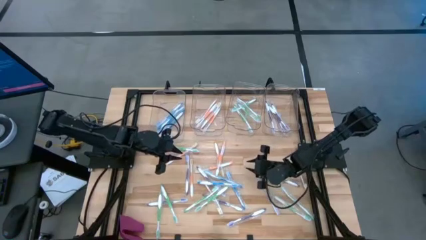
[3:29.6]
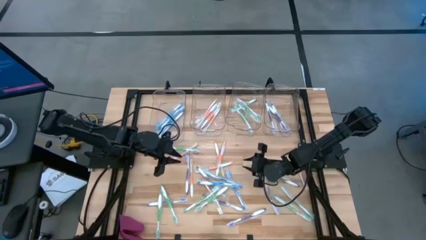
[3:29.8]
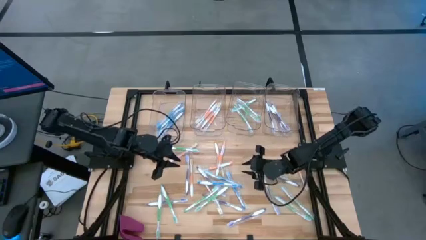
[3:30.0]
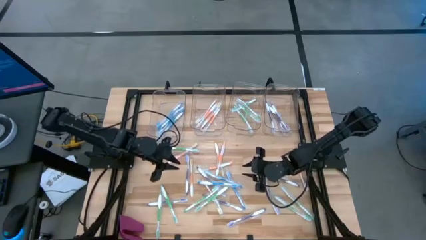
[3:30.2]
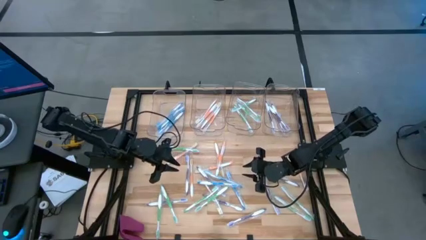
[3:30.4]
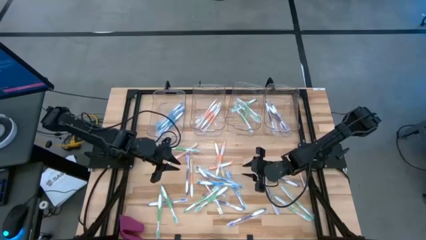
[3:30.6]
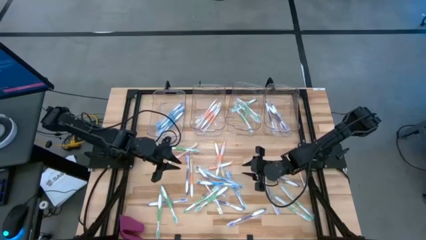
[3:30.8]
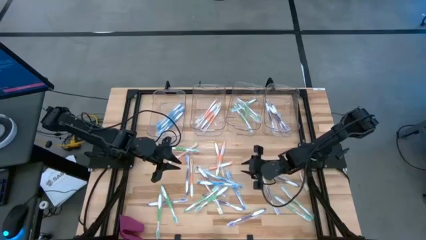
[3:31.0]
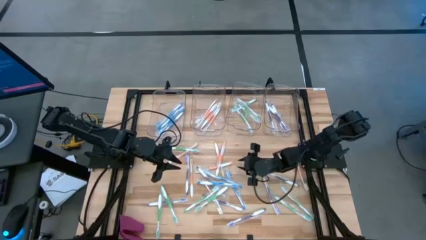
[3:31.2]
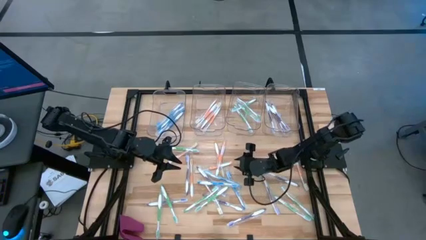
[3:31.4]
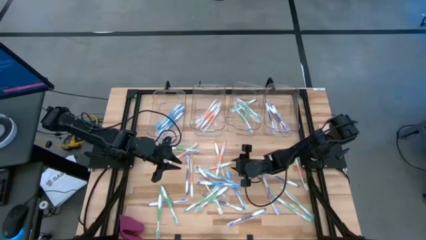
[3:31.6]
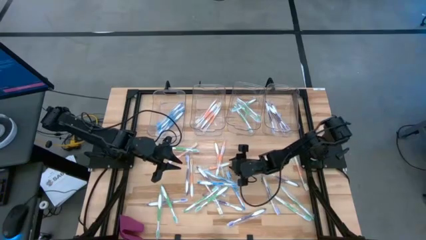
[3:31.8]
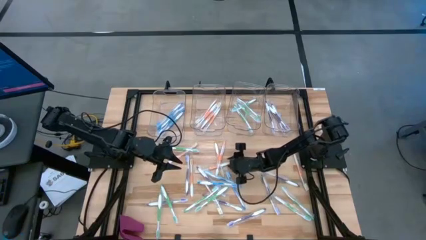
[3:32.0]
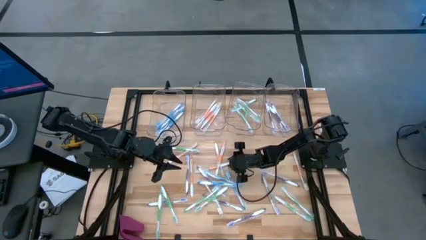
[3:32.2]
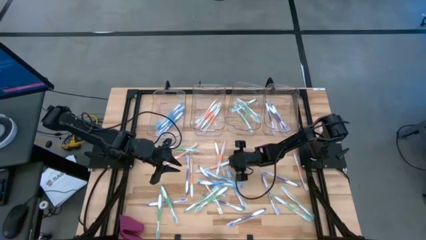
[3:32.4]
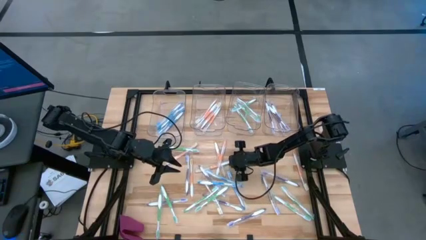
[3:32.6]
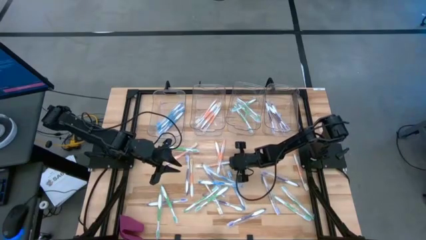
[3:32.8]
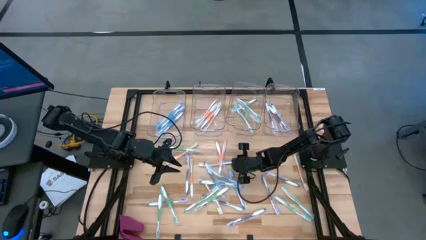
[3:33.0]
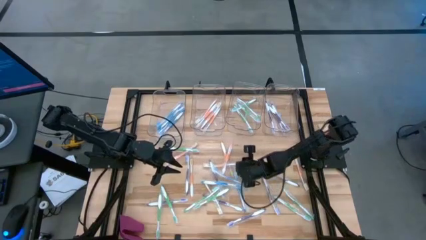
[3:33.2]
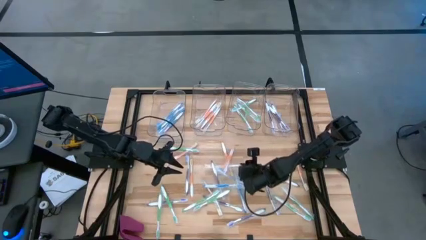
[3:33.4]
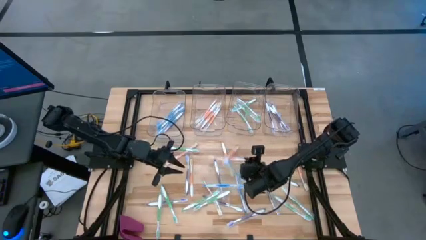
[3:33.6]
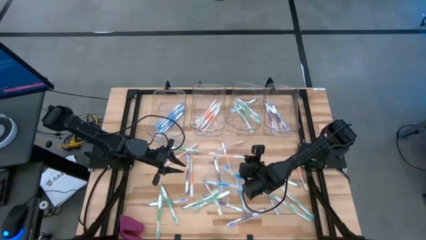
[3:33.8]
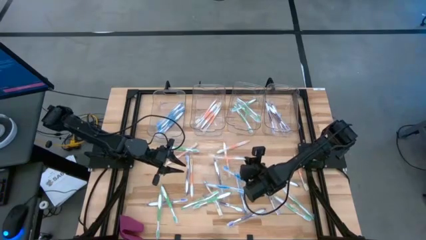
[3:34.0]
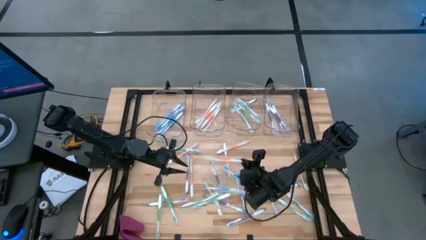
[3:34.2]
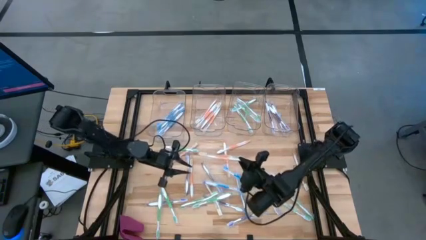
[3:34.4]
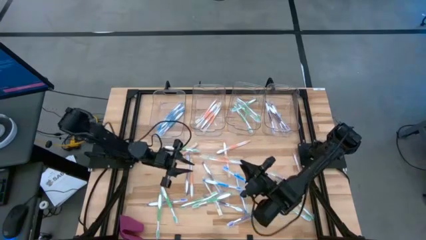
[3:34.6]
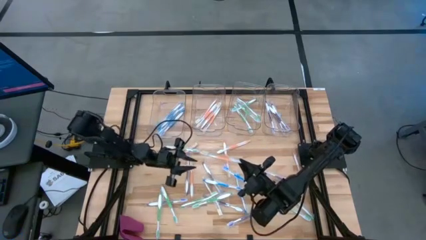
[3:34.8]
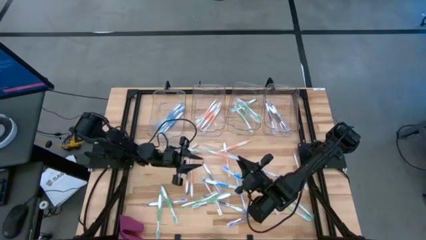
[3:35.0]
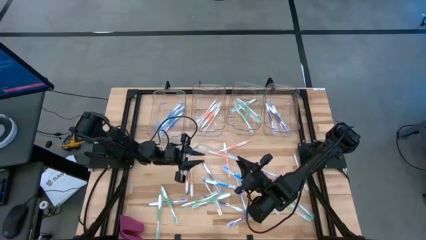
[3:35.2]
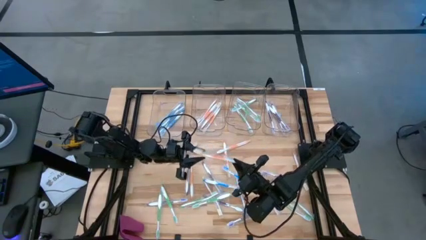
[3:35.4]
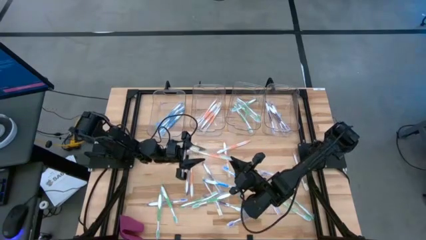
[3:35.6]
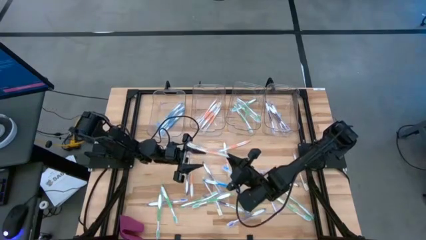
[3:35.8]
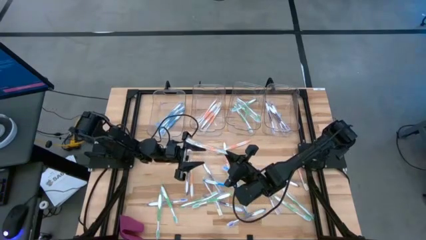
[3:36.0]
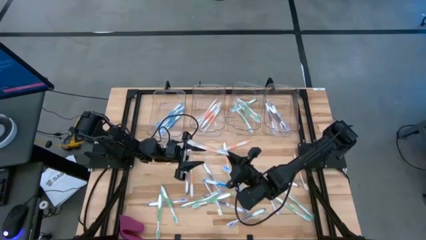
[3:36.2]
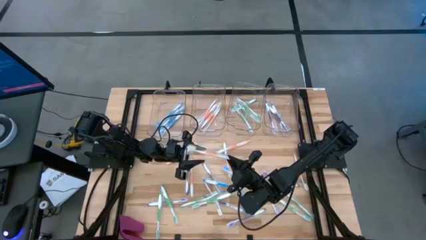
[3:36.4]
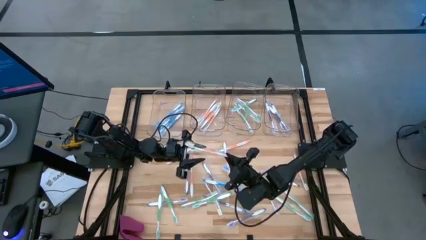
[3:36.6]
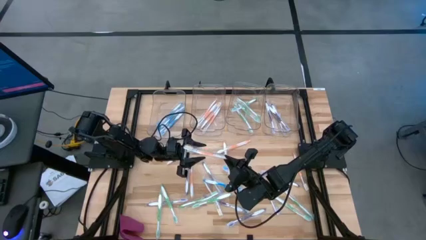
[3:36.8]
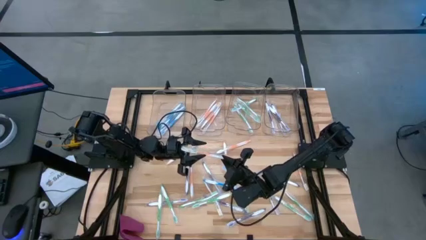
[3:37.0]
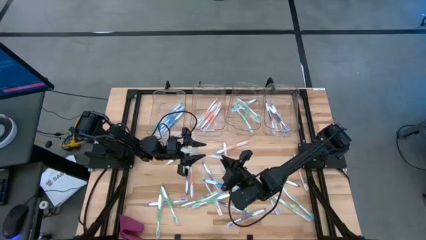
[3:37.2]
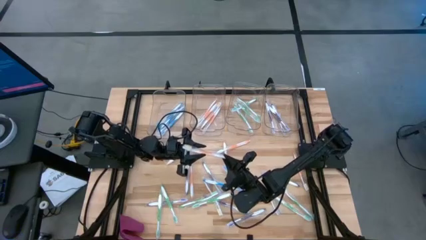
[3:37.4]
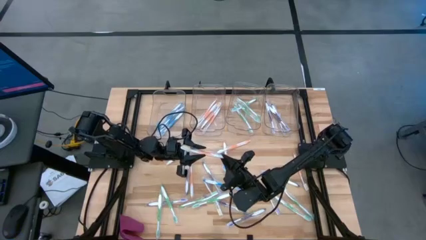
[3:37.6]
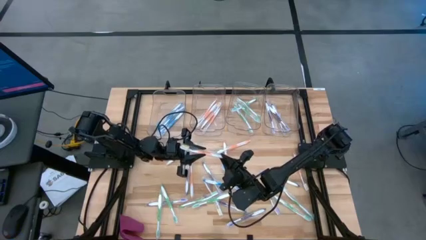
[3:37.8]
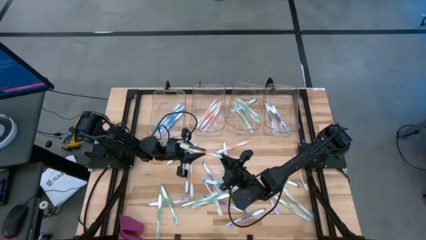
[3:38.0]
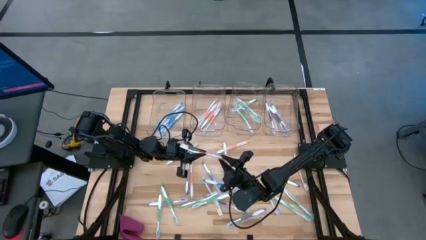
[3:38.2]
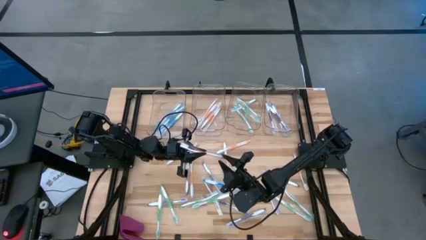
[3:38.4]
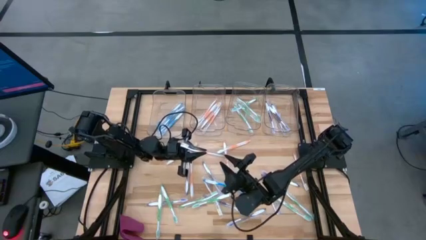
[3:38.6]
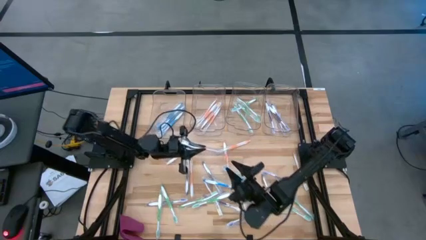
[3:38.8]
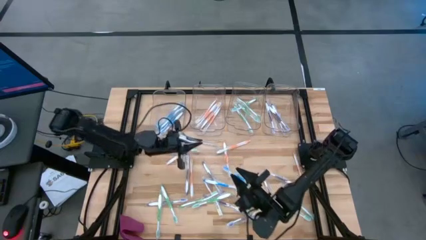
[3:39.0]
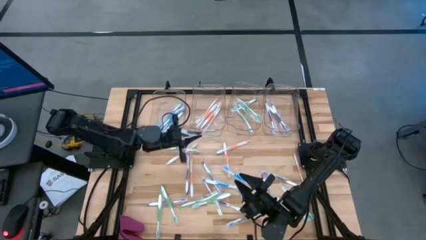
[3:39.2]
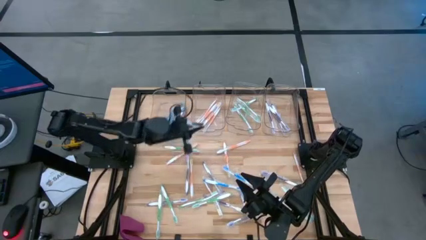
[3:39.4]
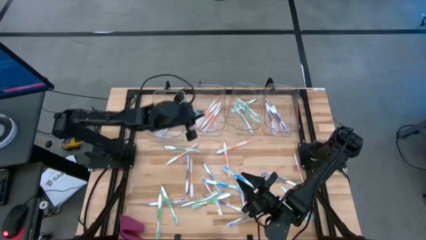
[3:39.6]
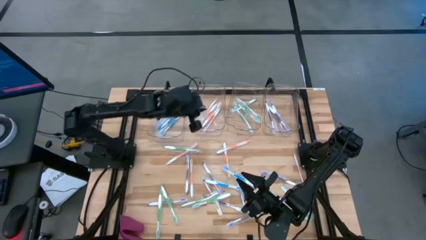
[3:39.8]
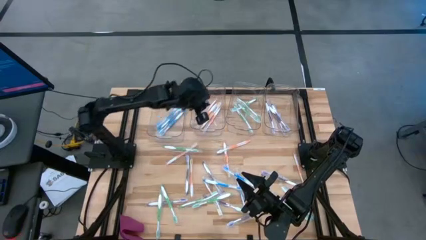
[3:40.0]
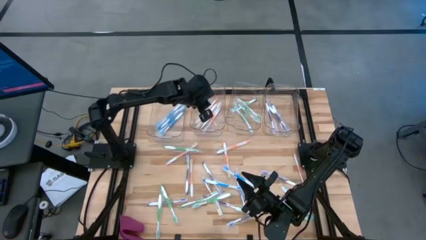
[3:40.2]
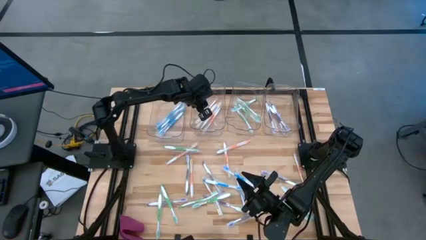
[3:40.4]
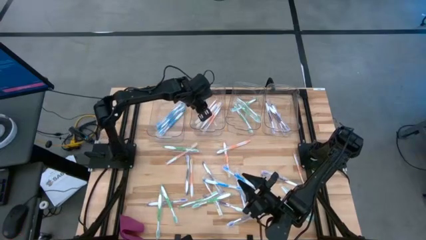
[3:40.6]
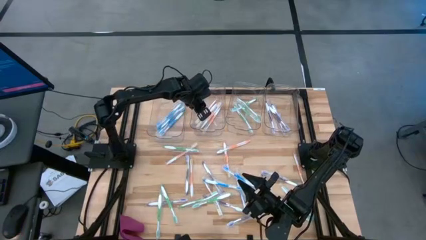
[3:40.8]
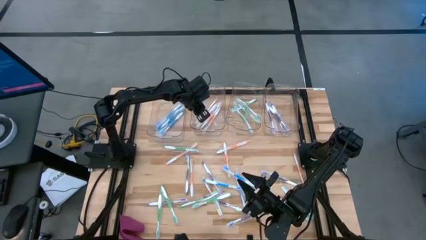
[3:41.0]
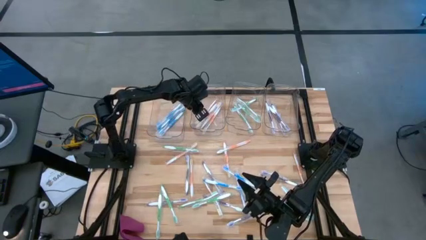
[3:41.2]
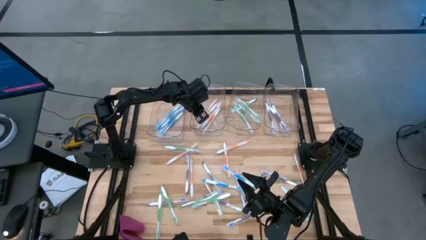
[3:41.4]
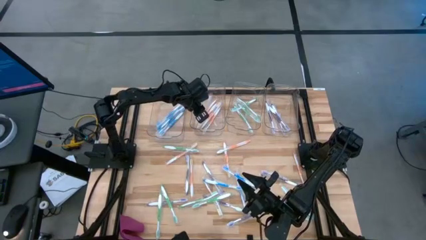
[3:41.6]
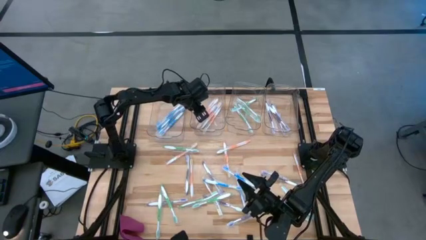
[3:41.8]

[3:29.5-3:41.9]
Task: Pick & Place Toothbrushes
Put the orange toothbrush into the middle left transparent bin

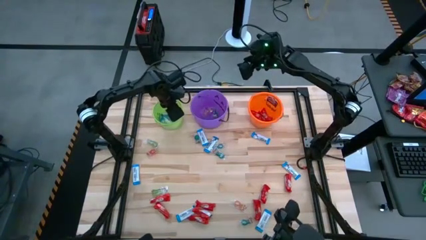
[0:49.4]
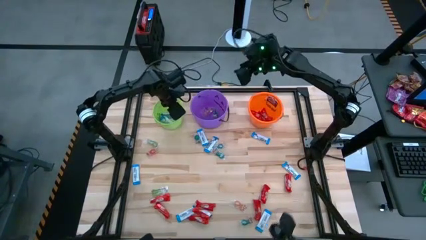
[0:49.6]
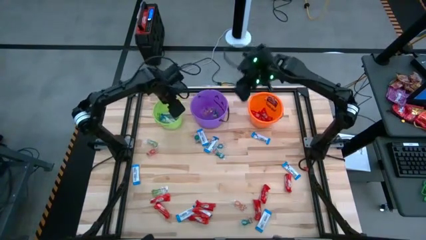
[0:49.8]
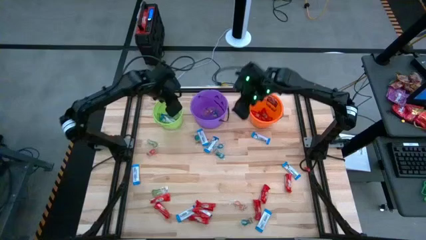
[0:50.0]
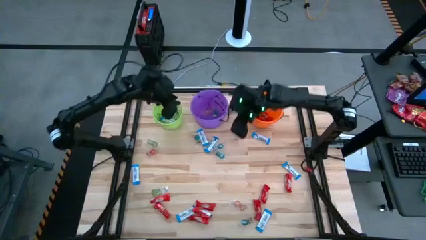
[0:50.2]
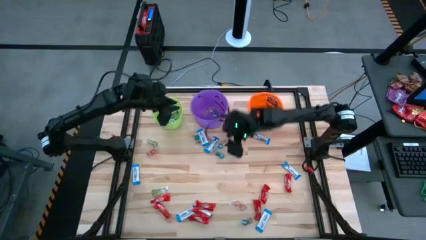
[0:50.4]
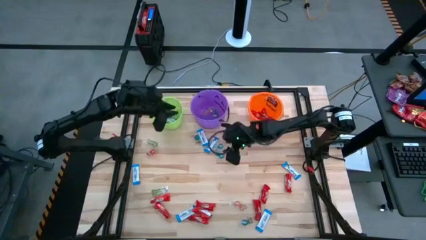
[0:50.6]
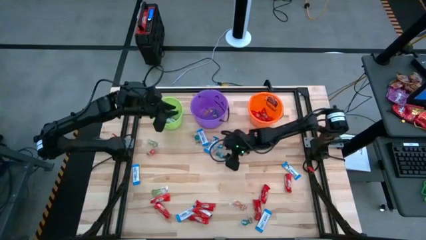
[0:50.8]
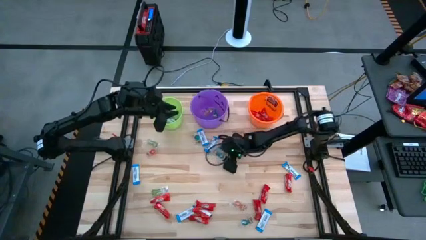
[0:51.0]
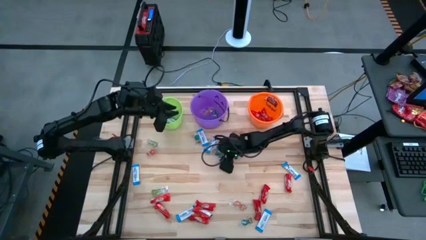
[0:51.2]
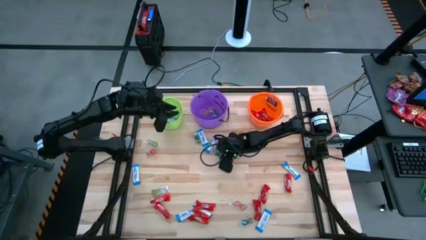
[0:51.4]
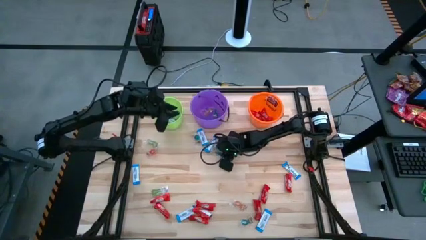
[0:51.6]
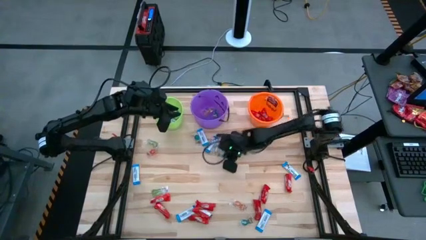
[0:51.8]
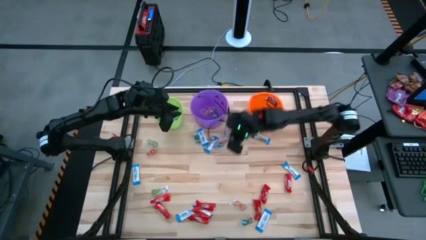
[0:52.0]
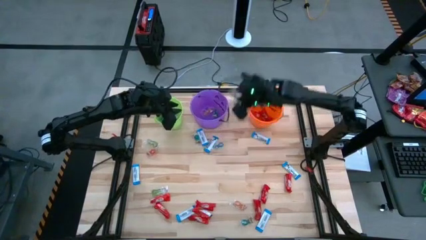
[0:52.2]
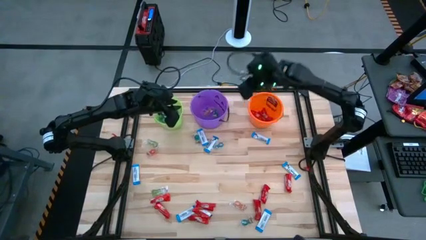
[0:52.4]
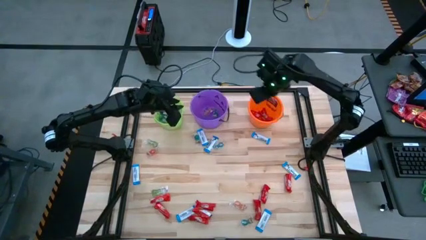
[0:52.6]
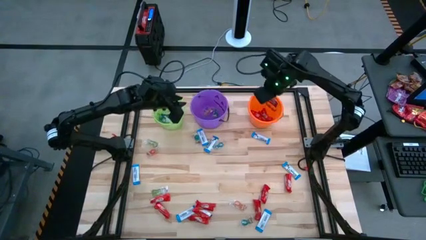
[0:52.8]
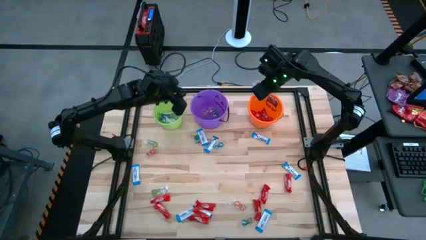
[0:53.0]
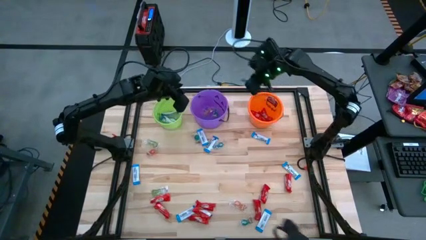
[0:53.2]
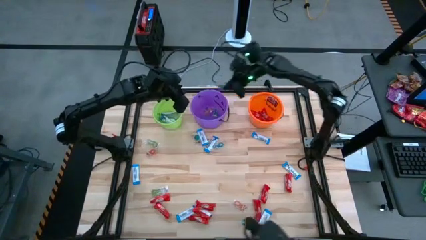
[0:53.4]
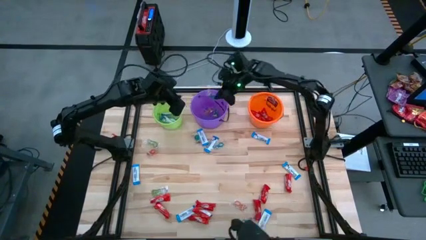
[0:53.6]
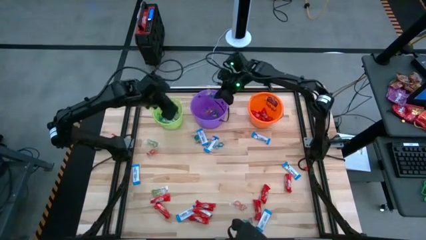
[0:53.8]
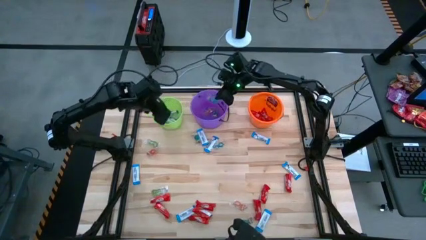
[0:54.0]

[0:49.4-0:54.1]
Task: Sort candy by brand, put in halloween buckets
Put the blue gummy into the purple bucket
